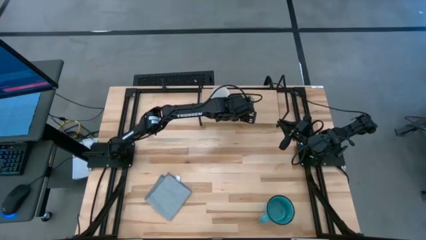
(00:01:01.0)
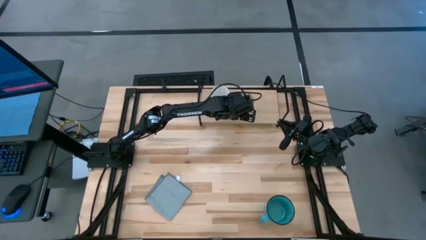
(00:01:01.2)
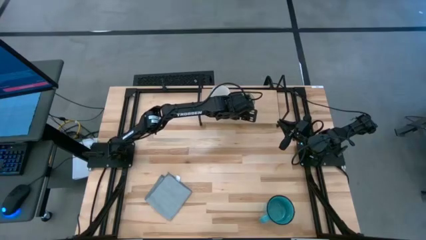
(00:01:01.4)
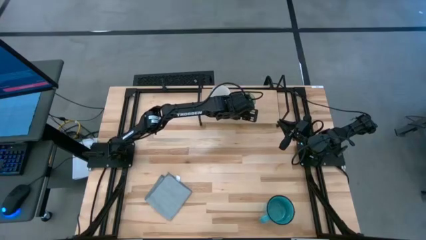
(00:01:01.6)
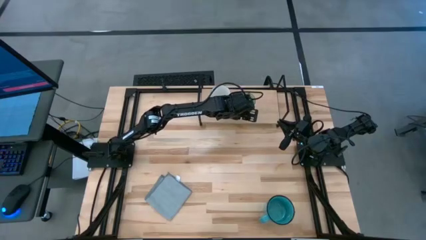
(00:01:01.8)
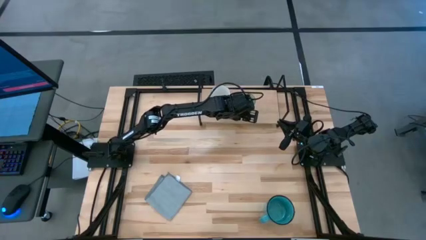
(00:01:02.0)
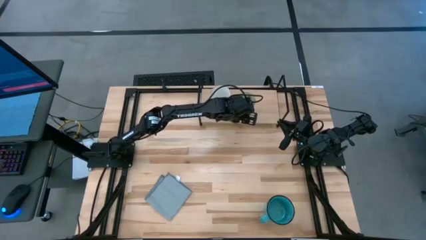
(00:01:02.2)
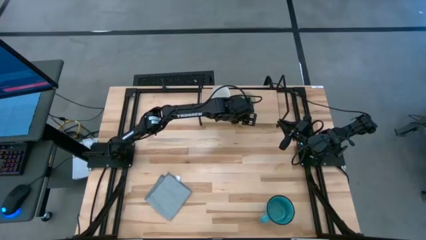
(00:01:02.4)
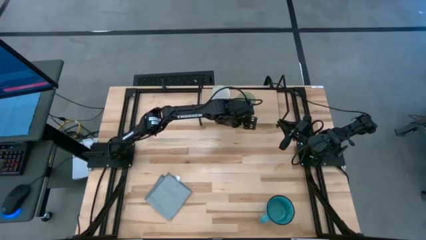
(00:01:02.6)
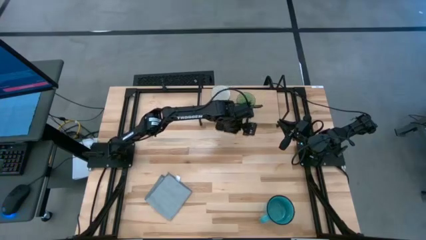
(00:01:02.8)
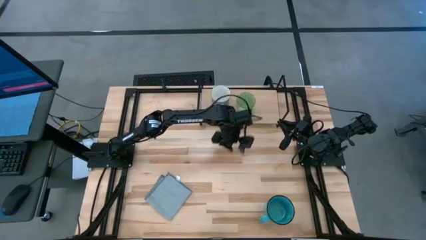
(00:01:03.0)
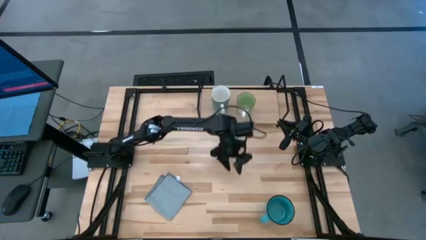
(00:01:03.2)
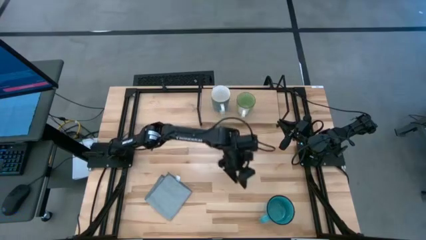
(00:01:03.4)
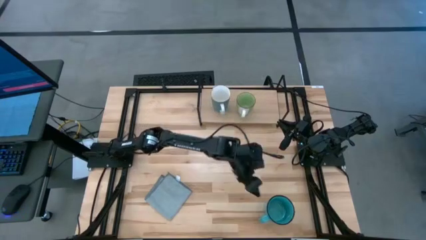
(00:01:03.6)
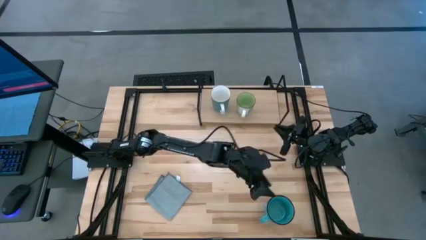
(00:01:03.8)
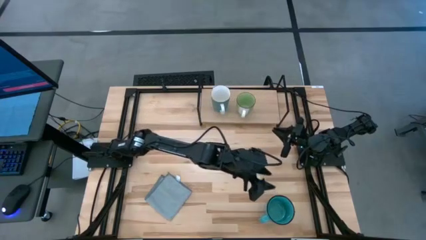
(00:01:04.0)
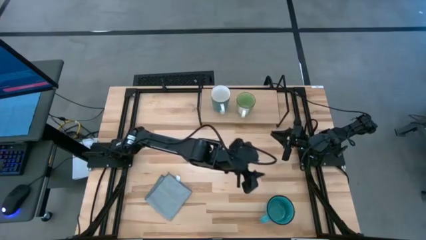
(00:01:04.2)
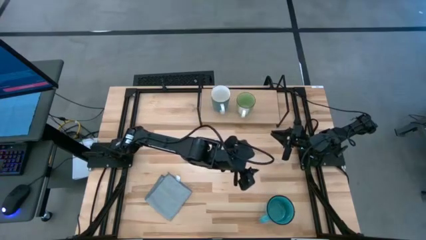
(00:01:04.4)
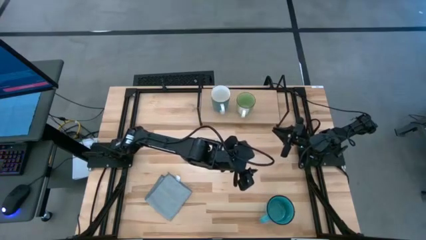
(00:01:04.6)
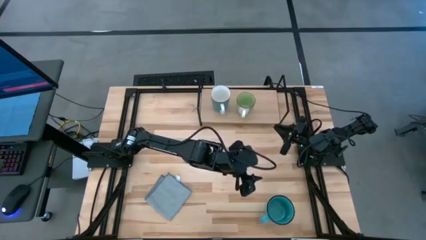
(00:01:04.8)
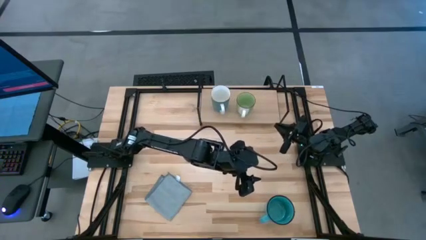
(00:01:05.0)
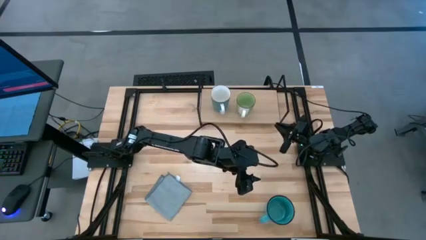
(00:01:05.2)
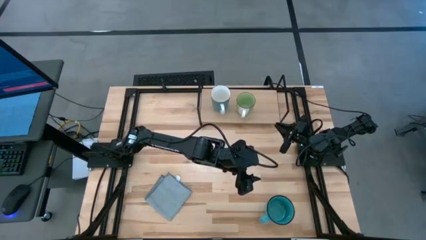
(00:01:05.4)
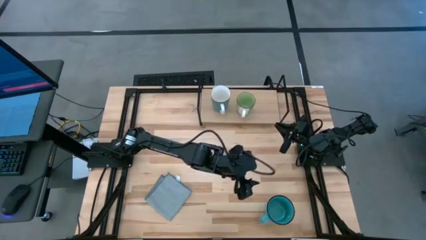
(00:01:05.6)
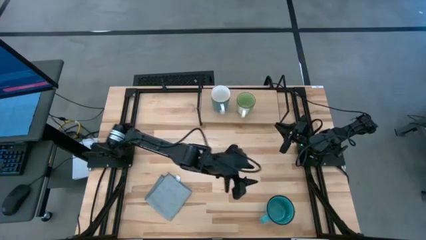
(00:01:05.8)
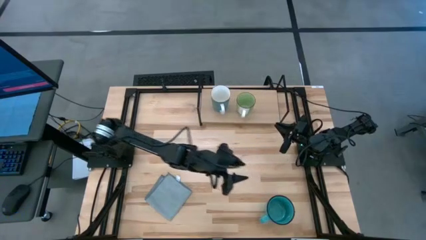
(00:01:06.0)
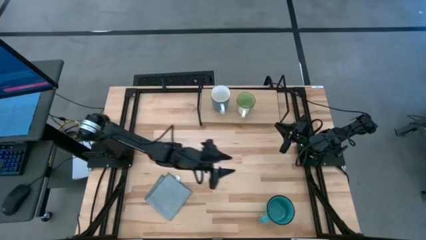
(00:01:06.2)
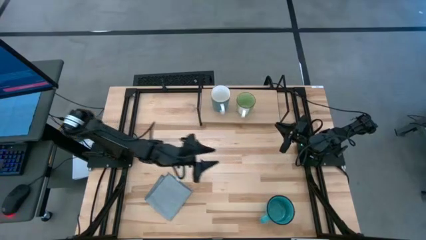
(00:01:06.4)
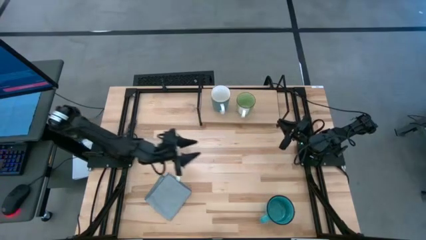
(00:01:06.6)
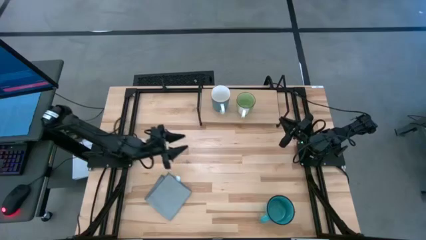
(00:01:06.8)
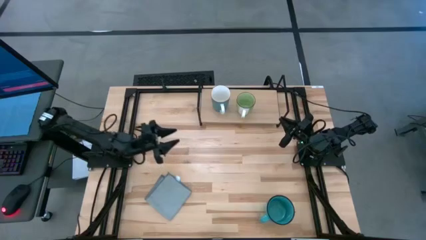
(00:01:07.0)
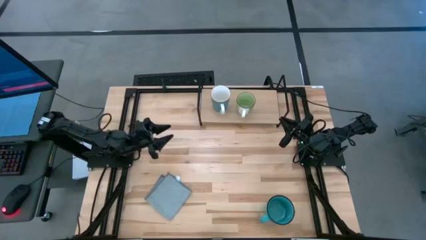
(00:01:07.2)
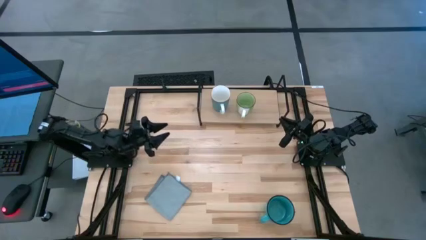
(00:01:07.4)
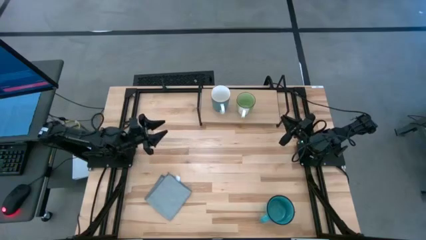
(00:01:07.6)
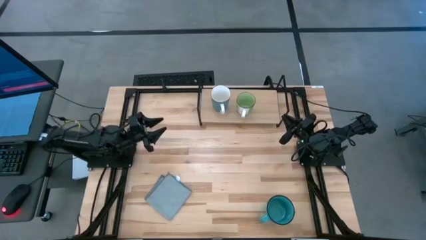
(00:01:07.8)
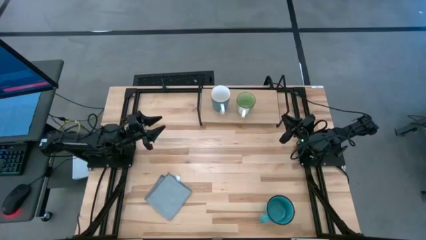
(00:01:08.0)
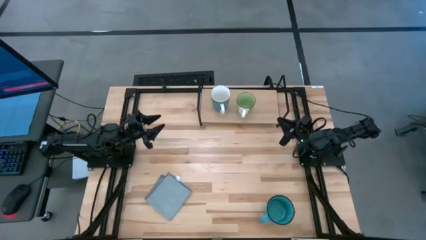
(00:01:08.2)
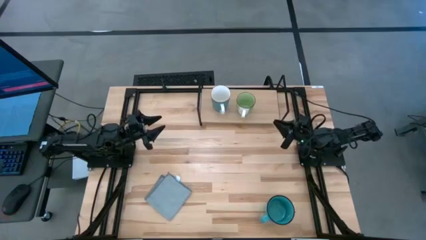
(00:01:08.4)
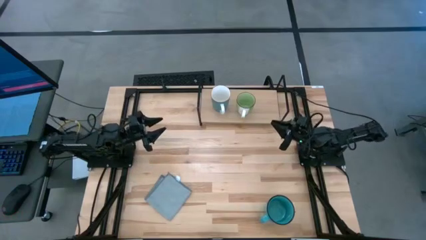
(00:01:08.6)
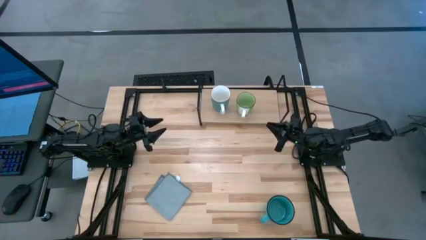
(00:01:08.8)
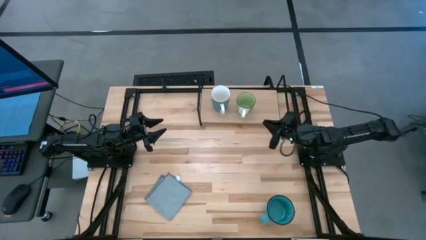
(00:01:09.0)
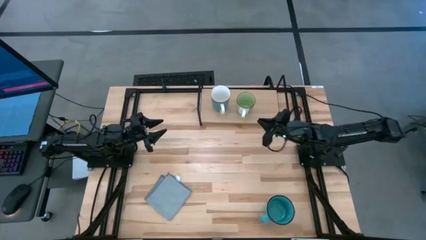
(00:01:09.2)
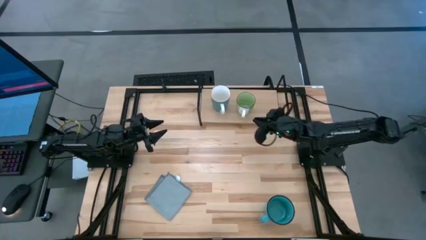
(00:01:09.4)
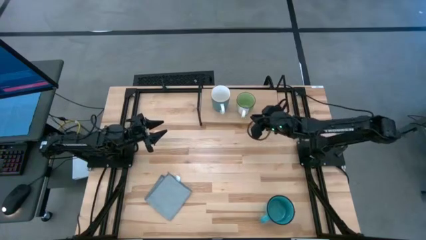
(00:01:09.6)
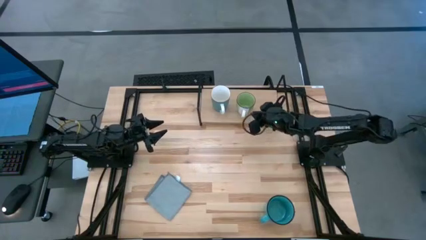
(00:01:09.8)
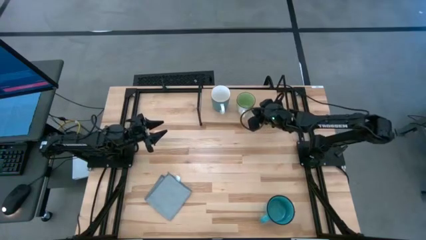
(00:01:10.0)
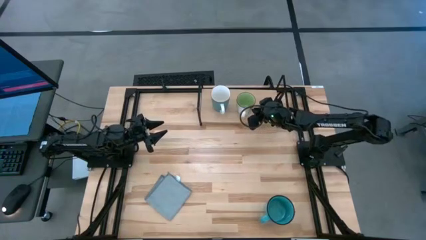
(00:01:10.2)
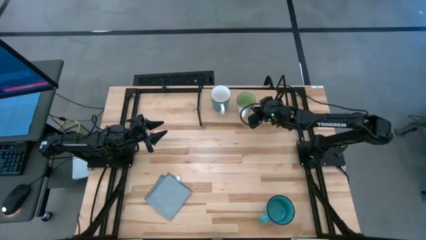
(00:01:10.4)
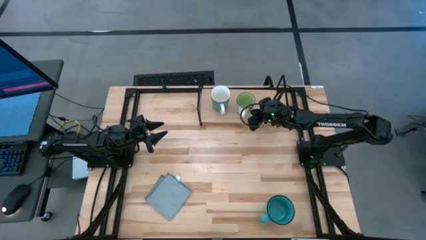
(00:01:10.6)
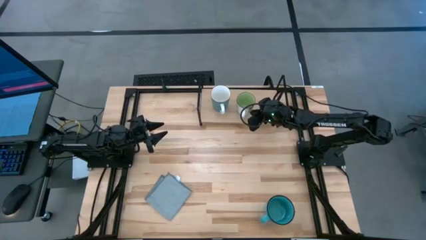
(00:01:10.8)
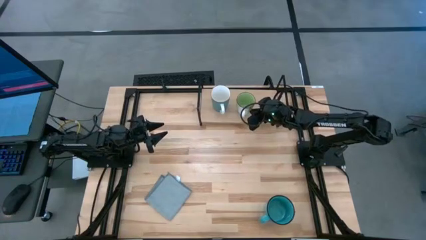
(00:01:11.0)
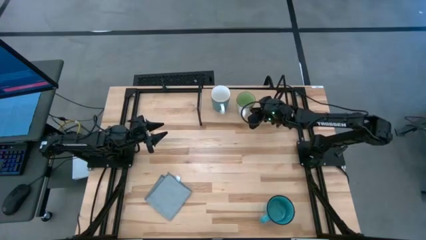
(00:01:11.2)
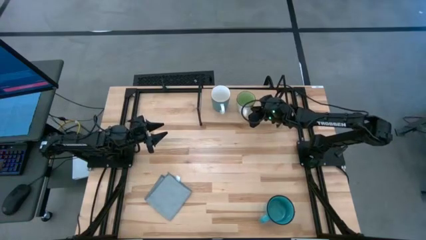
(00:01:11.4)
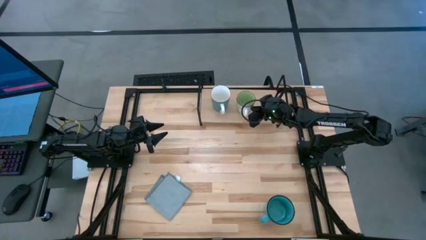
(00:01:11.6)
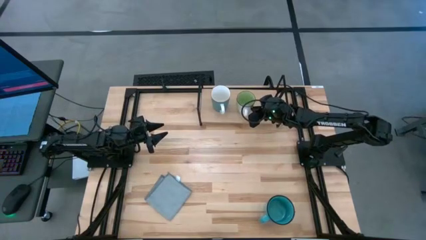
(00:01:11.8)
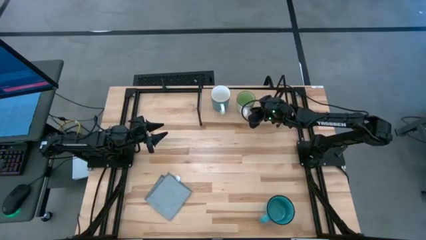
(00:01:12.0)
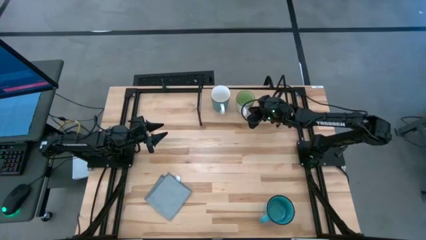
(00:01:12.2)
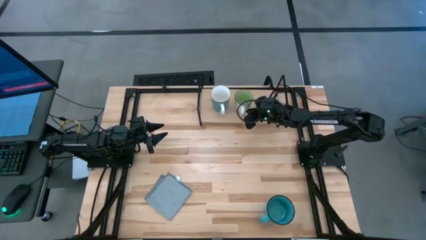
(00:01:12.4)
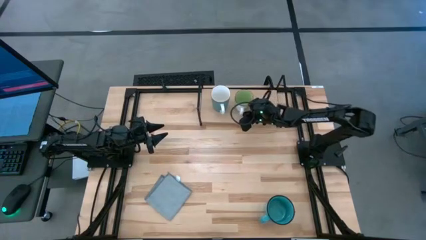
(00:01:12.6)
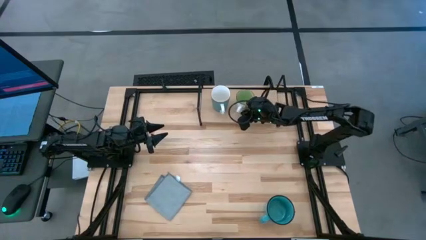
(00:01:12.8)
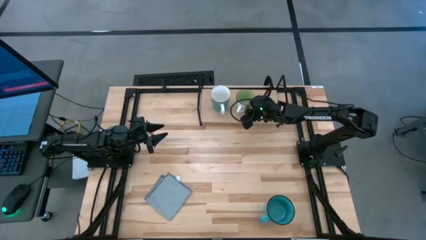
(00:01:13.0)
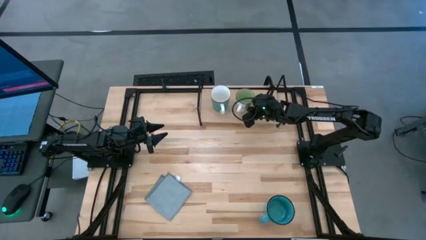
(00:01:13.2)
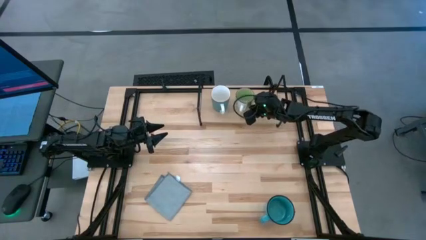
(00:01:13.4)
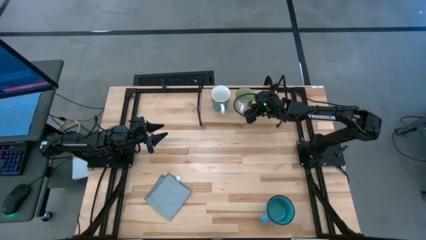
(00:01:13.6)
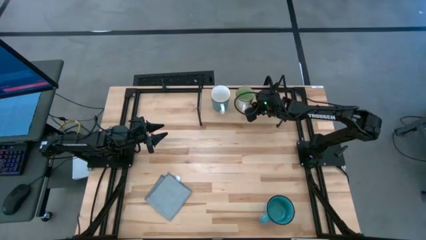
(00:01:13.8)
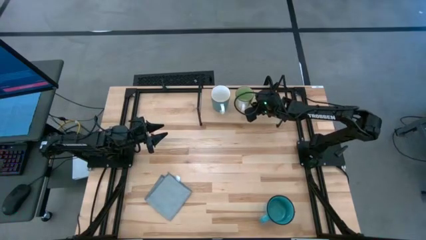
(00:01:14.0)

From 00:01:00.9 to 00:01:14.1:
Task: Stack small to large cups/mugs on shelf
Put the green mug on the shelf
